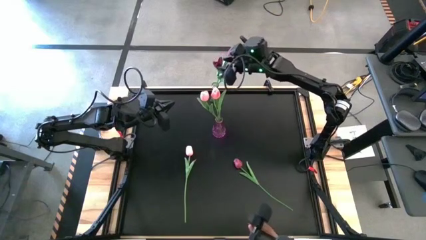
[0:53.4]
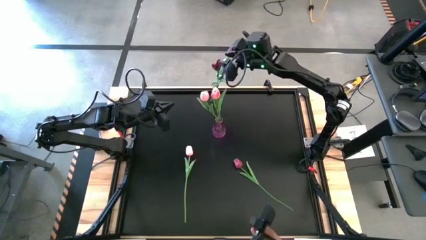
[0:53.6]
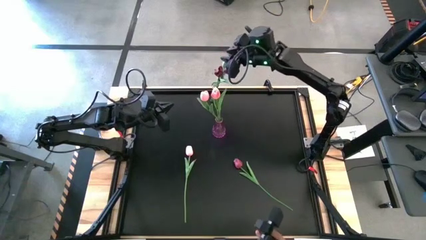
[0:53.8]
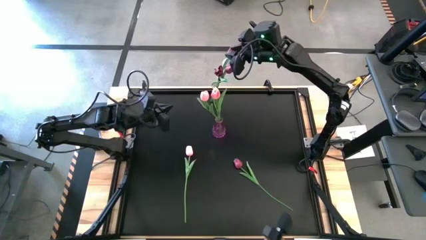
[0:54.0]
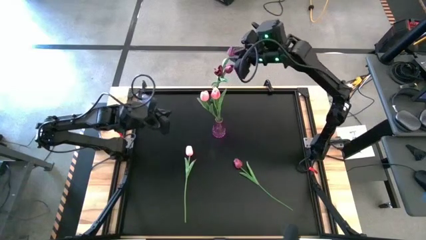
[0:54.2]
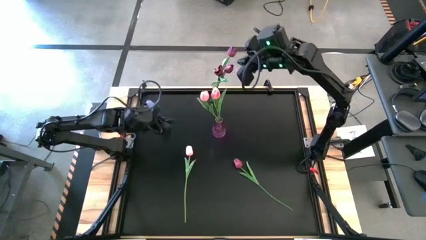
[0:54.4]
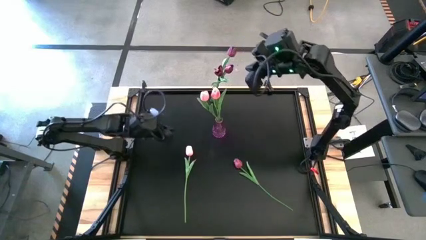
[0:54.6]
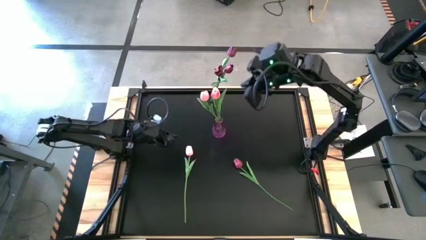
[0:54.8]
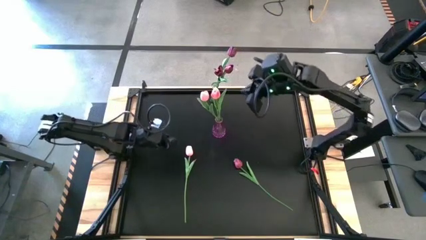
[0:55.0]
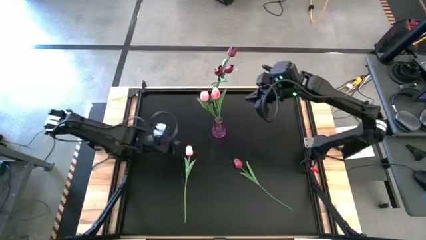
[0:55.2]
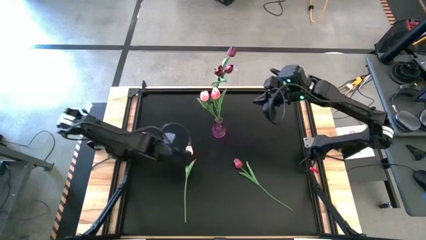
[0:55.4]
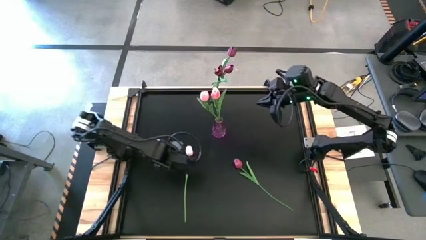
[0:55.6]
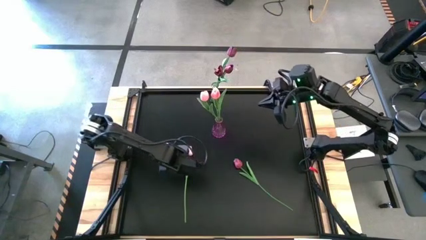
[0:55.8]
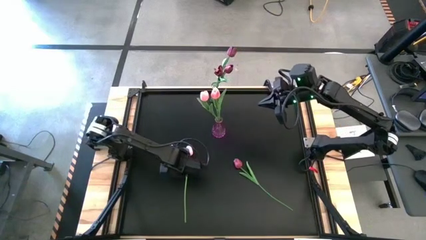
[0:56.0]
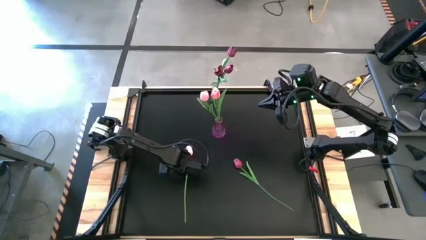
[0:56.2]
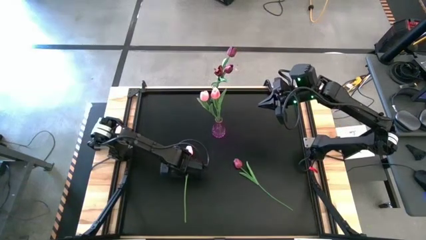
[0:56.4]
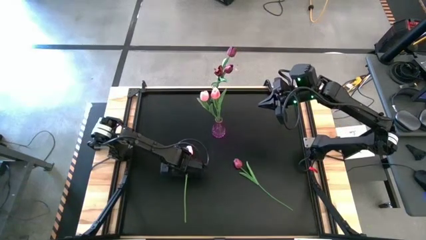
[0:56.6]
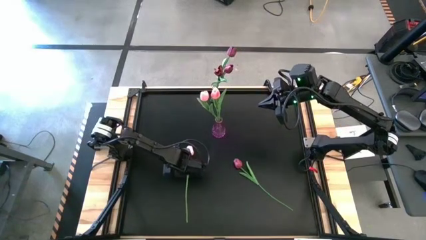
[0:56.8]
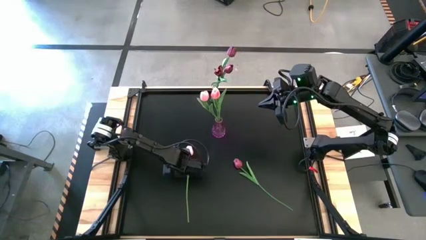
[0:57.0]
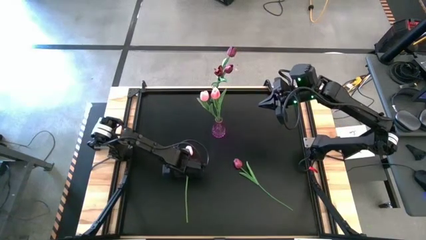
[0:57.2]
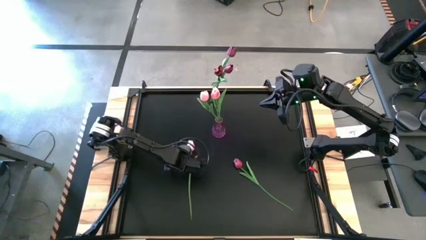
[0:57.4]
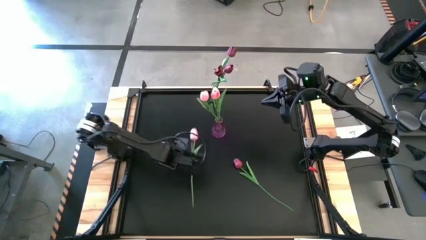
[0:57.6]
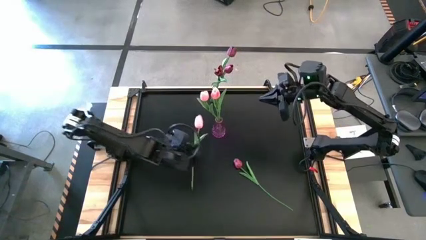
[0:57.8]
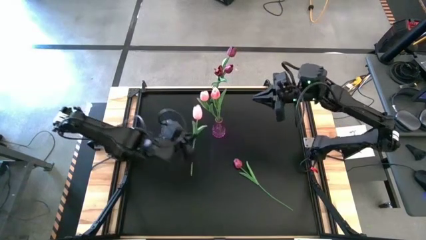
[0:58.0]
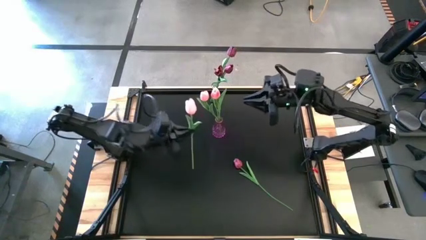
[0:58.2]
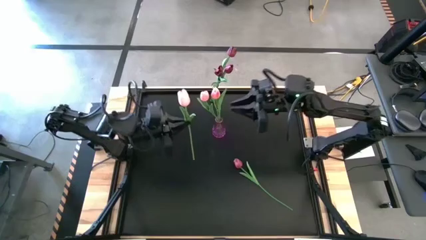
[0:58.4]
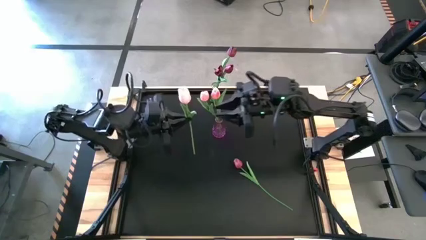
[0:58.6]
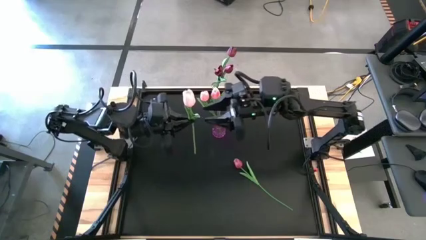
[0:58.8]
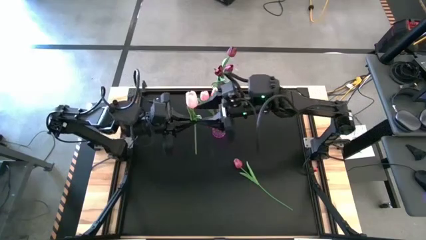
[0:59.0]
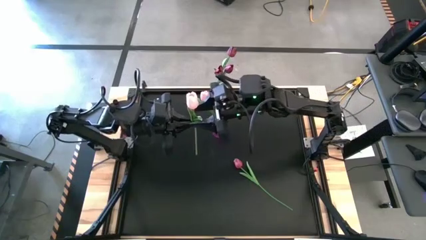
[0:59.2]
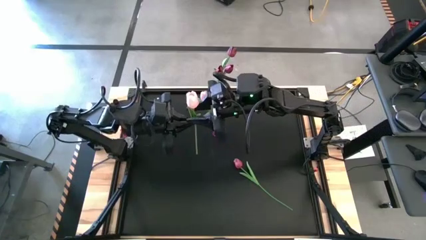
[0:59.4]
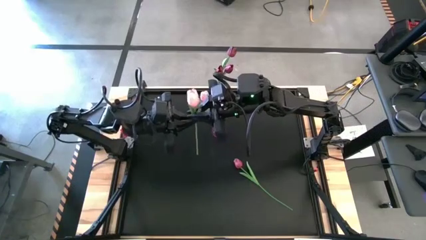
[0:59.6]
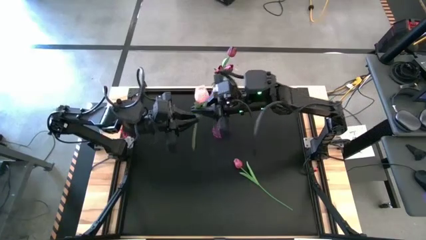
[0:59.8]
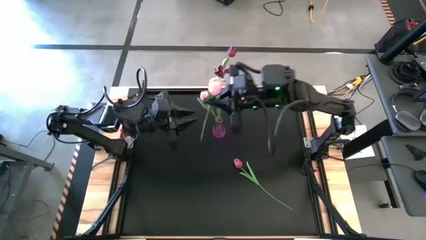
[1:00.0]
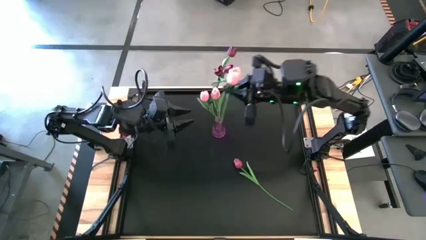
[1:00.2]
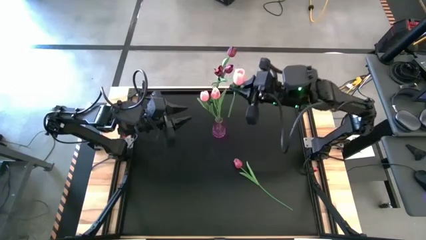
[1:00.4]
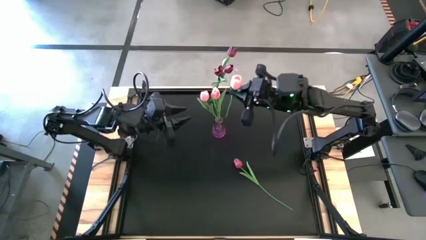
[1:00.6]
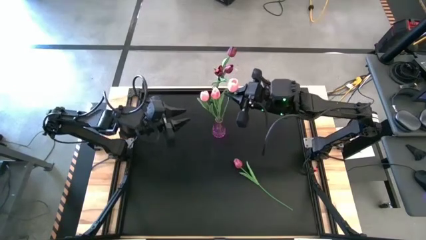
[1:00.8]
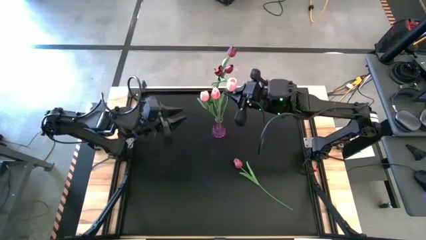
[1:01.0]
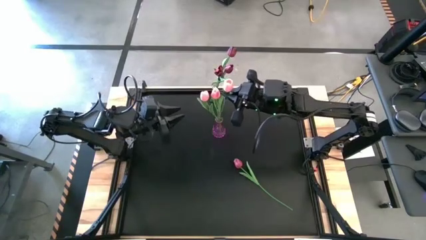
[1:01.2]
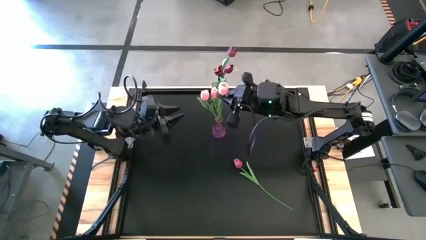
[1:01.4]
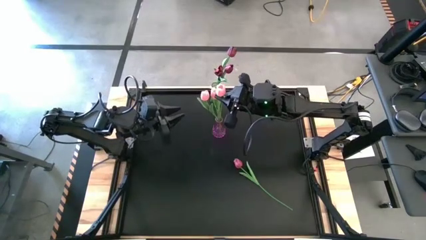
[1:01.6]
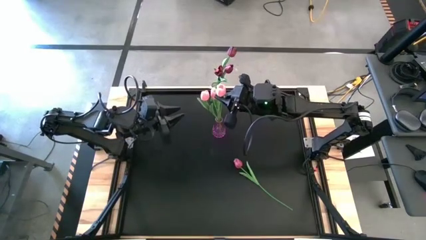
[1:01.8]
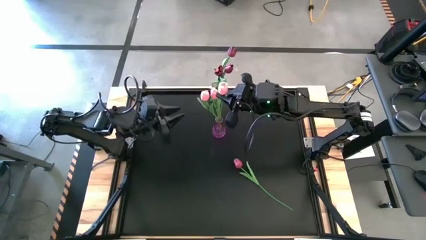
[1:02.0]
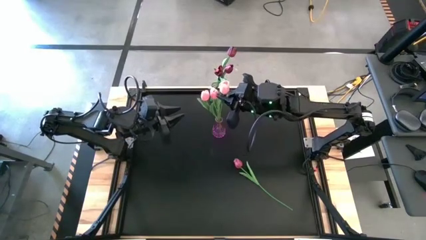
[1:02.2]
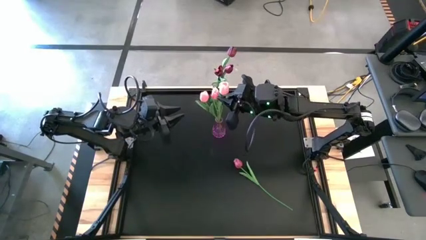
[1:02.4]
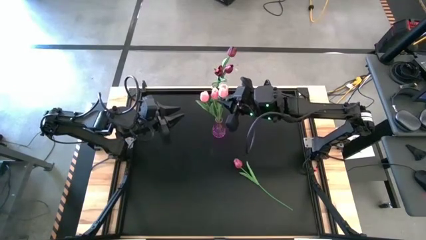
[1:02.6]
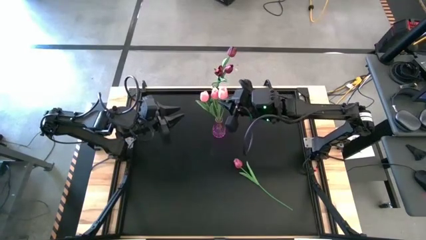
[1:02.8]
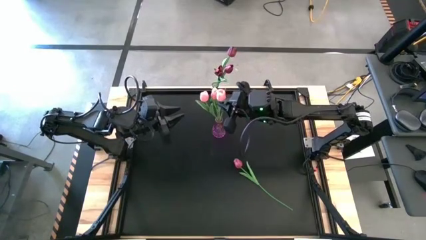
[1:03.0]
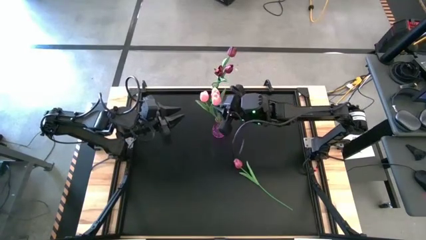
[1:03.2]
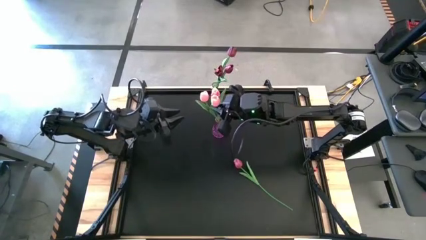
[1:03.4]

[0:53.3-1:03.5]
Task: Sort flowers into vase by color
Put the pink tulip into the purple vase

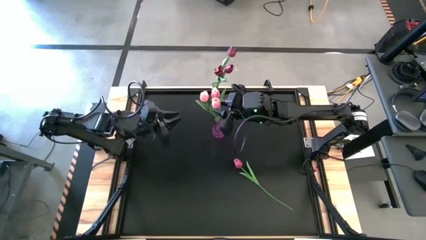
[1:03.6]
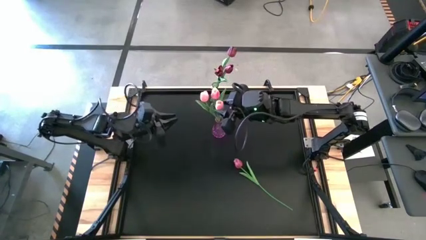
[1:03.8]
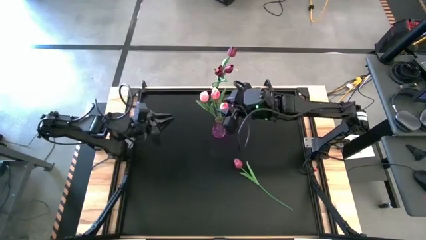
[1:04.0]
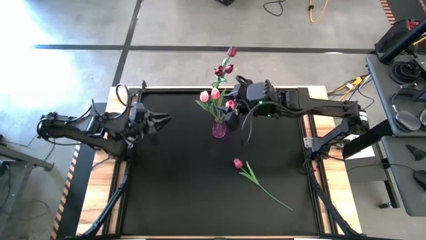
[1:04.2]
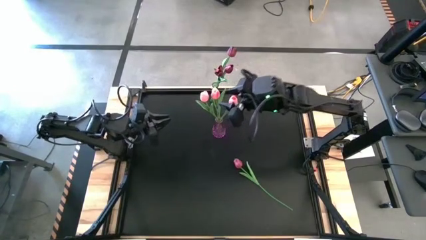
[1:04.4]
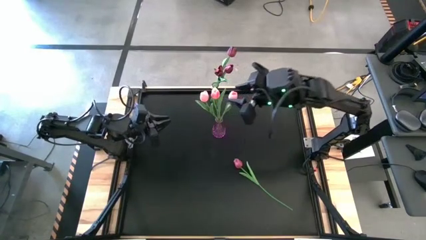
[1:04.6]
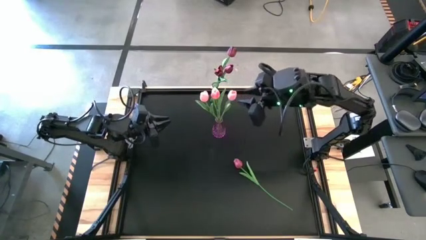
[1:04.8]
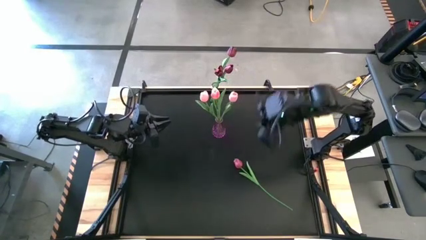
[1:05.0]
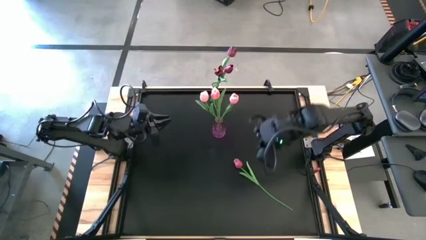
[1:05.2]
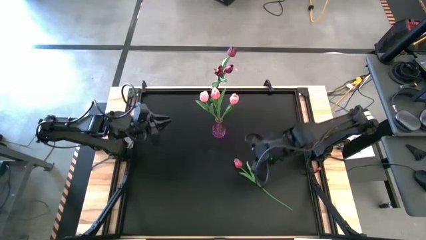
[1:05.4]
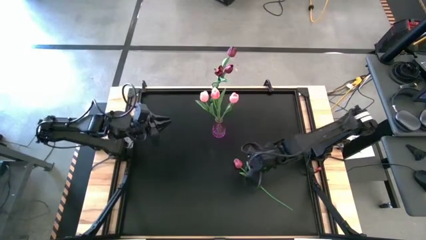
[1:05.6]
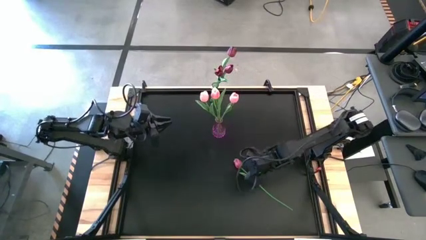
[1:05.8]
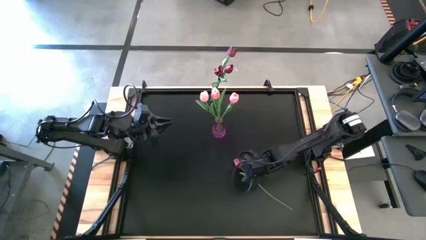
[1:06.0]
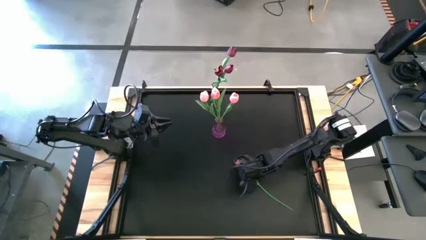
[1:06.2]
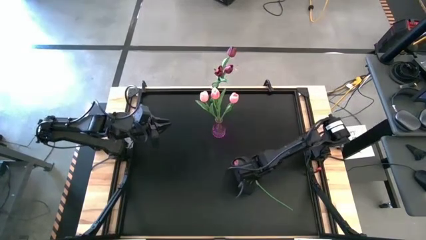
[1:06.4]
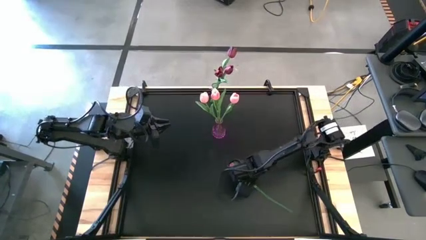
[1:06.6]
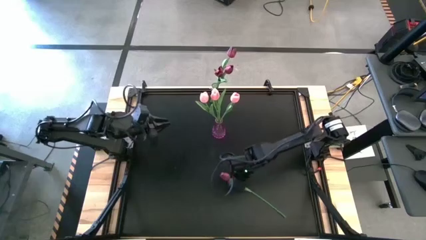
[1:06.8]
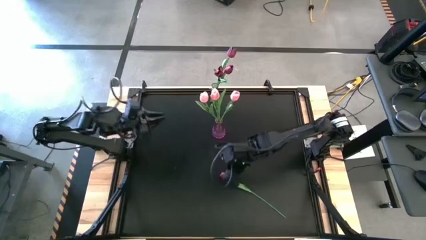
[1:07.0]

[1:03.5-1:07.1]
Put the red tulip into the green vase
